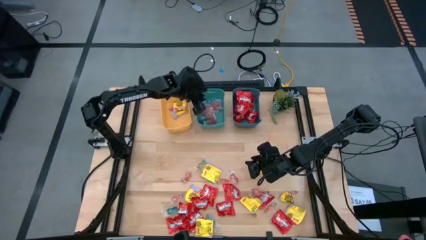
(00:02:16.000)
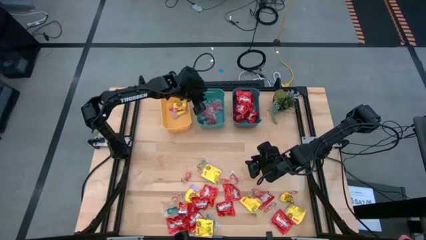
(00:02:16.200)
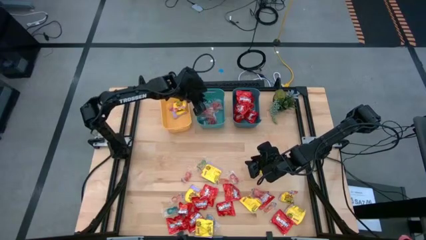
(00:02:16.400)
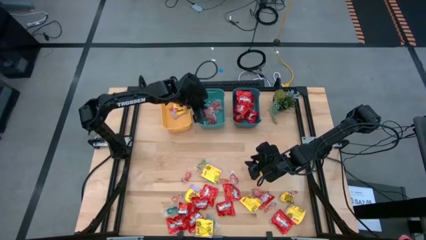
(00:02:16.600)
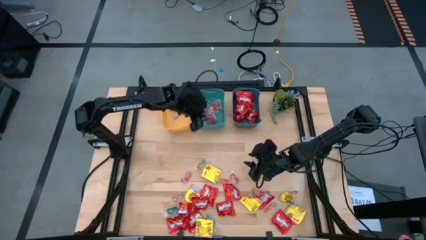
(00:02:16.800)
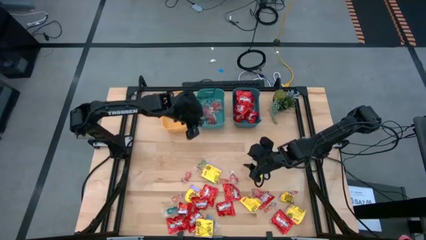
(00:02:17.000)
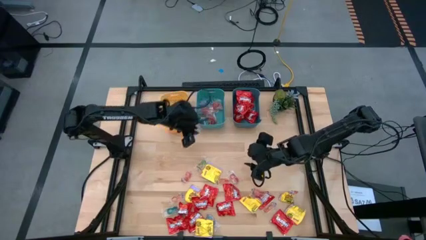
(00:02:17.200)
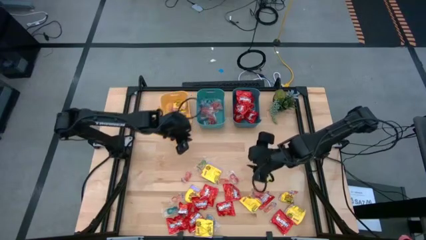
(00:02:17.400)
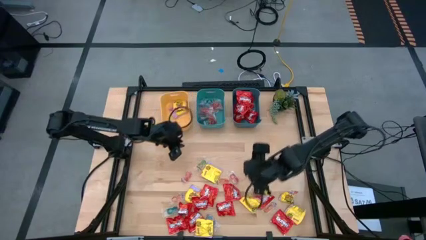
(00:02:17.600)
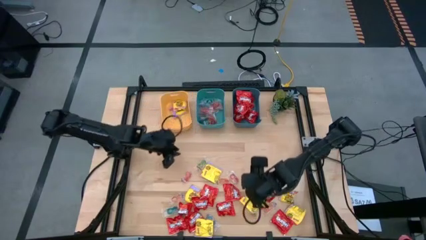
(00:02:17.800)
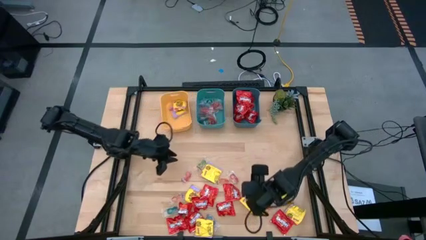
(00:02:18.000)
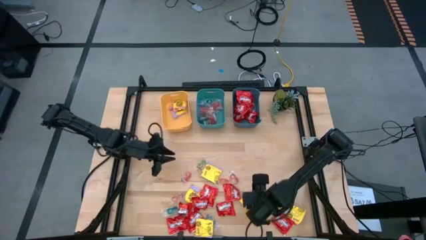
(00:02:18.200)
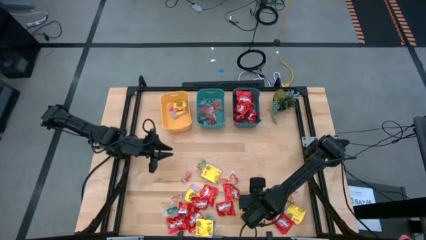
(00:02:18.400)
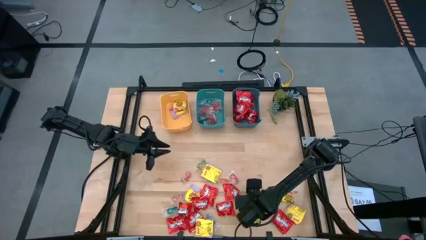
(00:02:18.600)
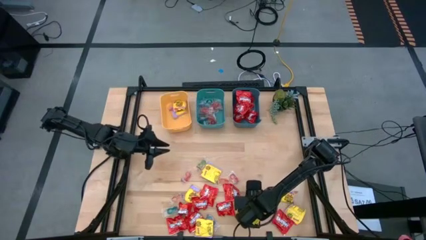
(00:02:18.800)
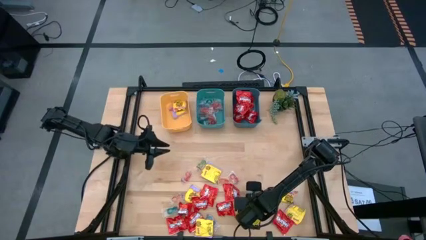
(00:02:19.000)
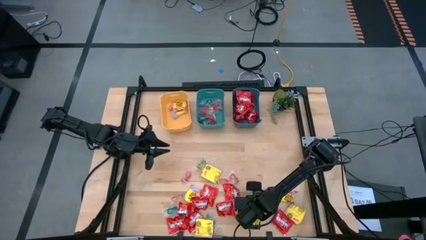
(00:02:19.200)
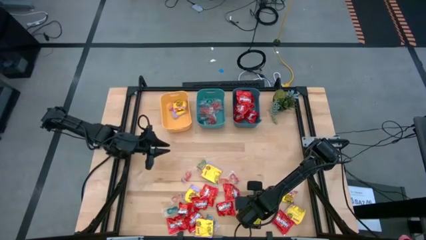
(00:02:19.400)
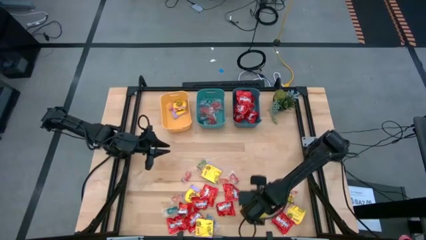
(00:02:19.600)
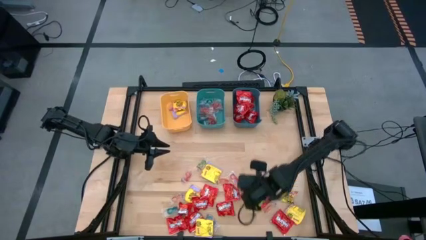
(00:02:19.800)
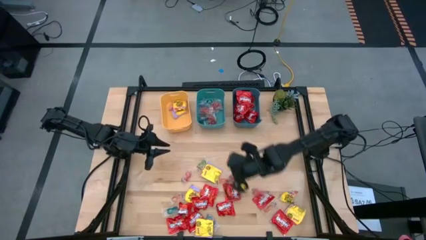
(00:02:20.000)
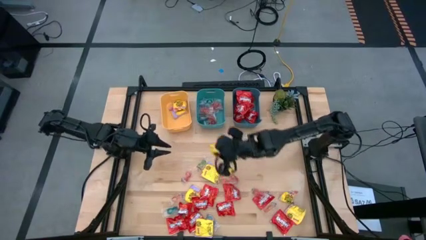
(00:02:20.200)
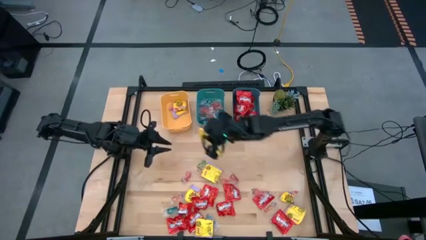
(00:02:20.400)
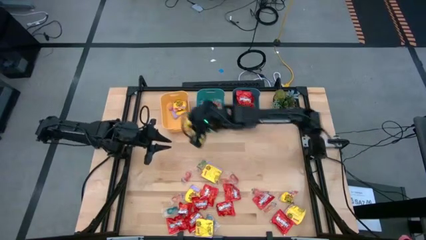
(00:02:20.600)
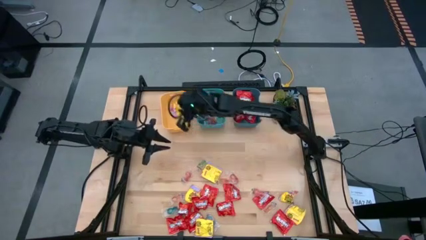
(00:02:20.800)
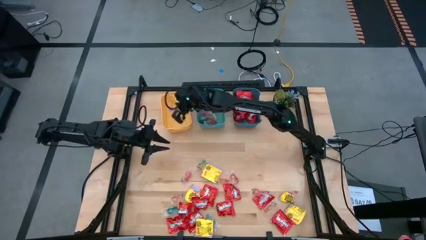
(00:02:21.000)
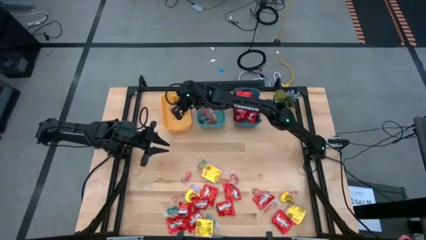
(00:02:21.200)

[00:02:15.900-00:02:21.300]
Task: Sort candy
Put the yellow candy into the yellow bin

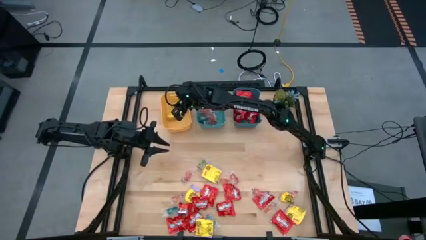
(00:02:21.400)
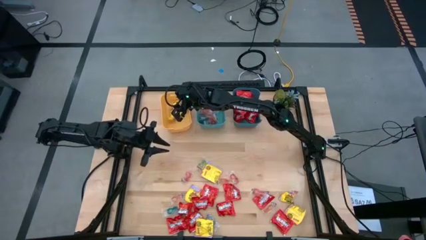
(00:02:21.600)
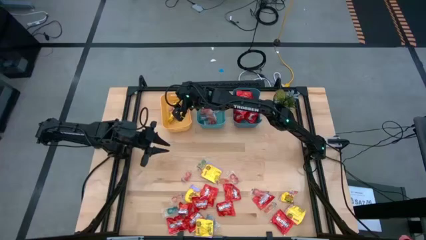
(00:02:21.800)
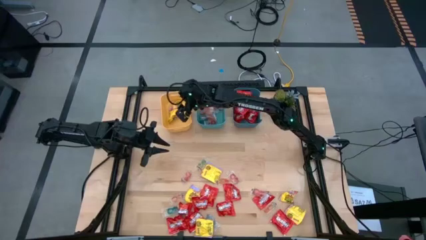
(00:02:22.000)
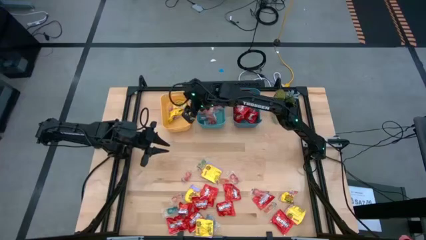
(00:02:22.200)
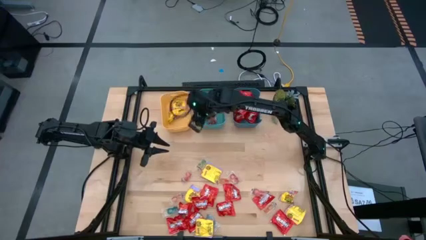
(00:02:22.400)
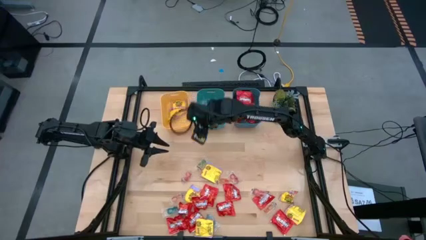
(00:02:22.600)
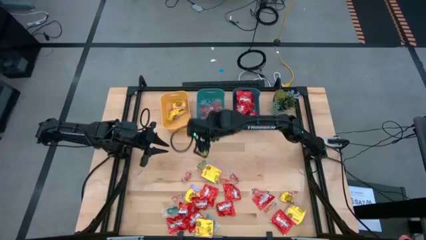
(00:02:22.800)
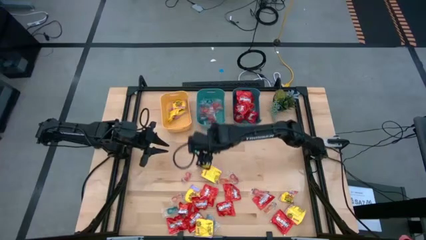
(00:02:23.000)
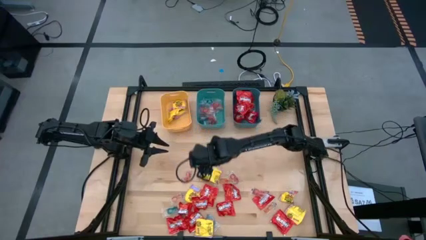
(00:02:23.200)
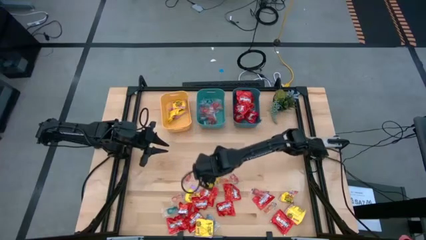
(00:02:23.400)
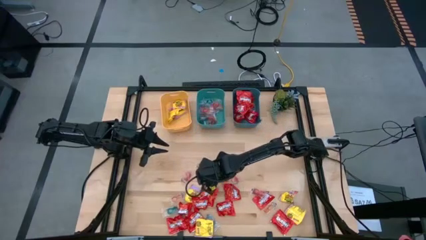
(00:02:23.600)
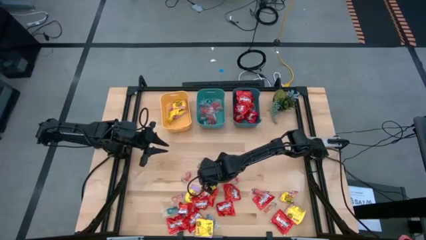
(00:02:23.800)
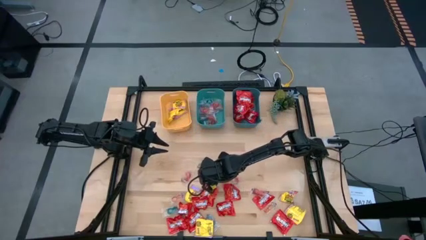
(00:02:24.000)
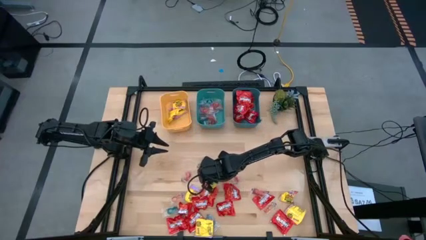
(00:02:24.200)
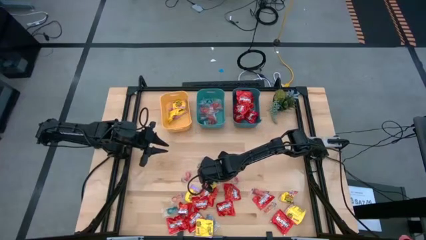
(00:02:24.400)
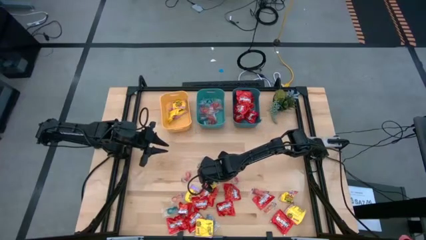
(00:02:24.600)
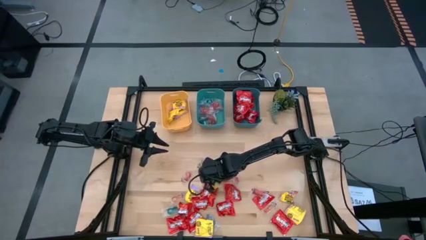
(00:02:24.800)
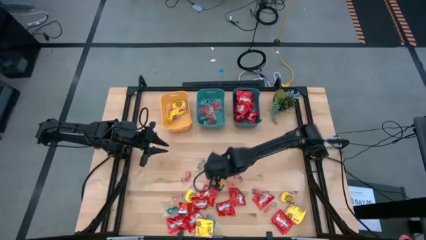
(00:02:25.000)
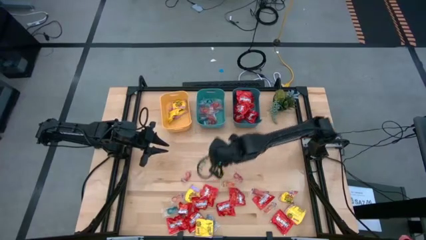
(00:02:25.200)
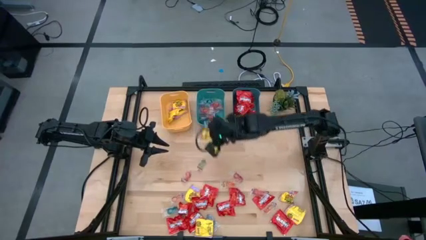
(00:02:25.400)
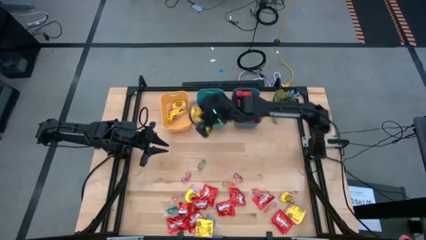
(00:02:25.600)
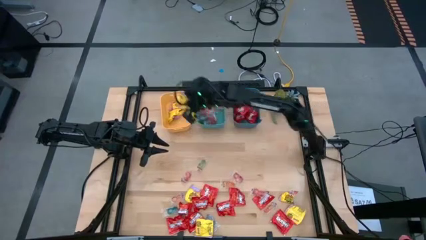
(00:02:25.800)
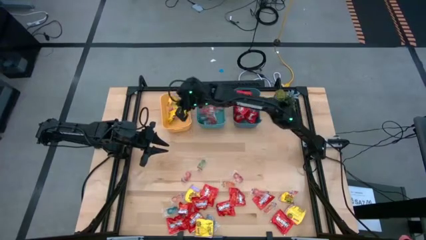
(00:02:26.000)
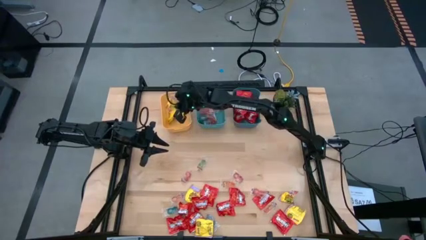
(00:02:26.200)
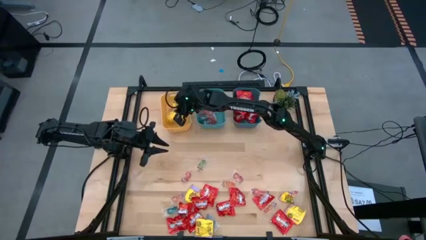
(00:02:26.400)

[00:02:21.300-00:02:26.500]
Put the yellow candy into the yellow bin

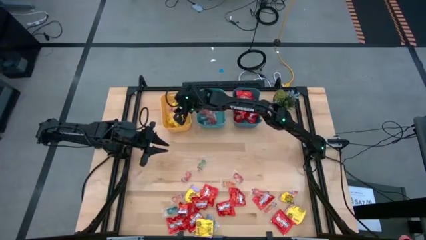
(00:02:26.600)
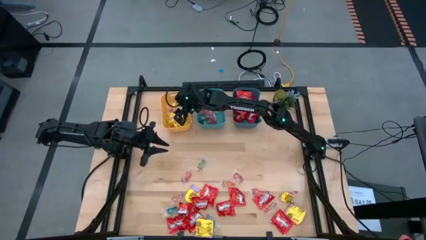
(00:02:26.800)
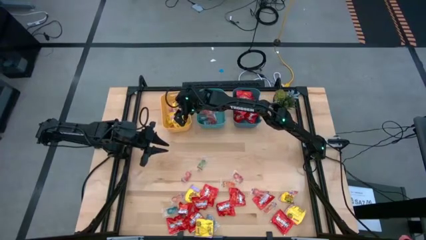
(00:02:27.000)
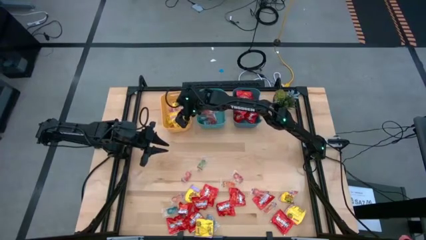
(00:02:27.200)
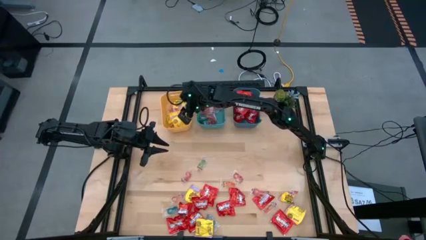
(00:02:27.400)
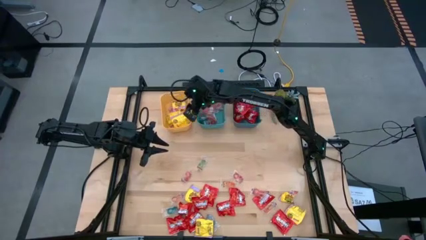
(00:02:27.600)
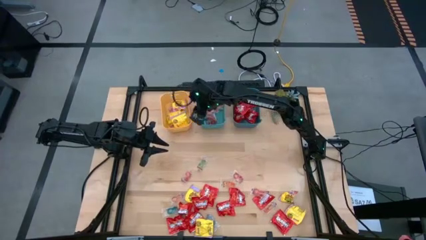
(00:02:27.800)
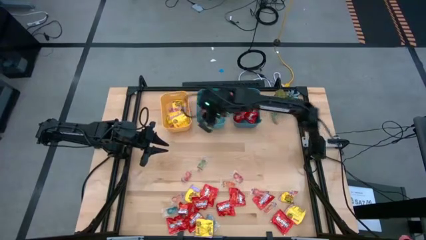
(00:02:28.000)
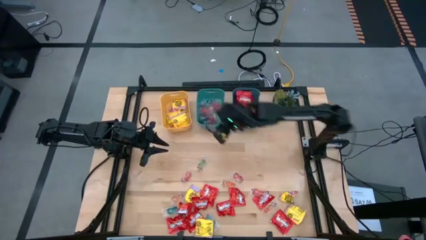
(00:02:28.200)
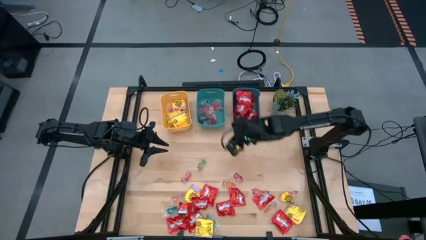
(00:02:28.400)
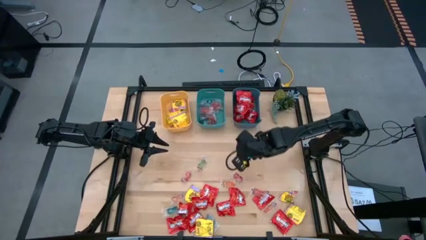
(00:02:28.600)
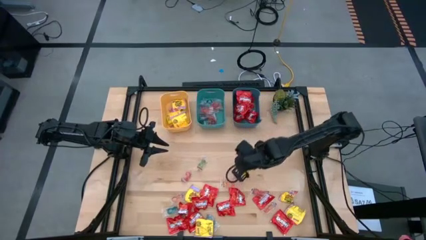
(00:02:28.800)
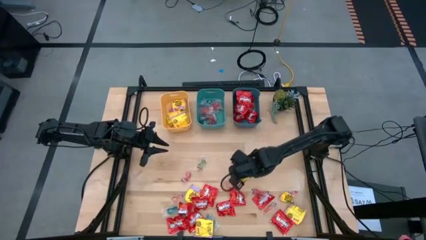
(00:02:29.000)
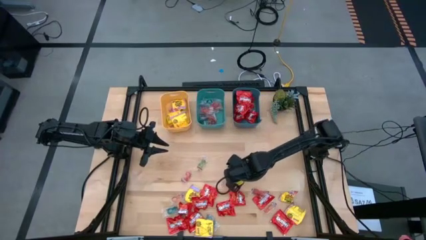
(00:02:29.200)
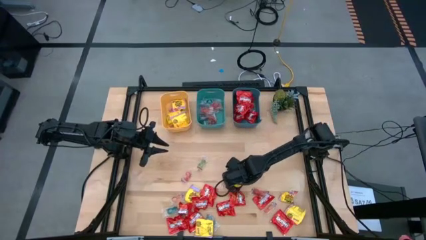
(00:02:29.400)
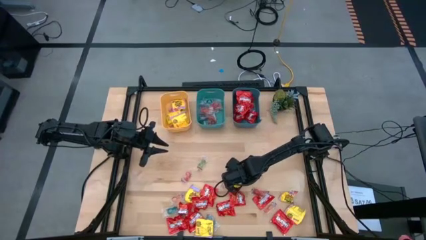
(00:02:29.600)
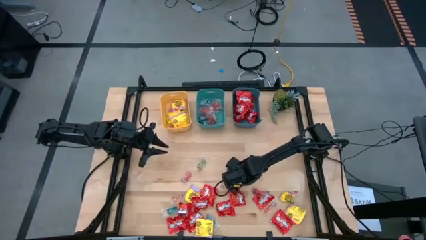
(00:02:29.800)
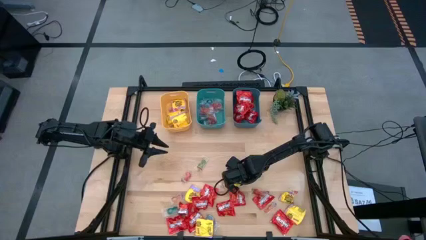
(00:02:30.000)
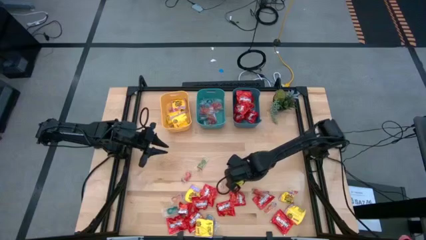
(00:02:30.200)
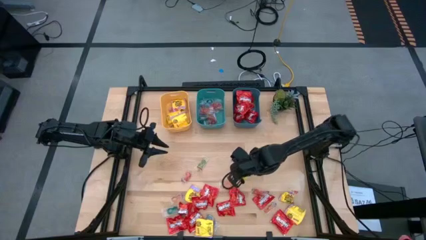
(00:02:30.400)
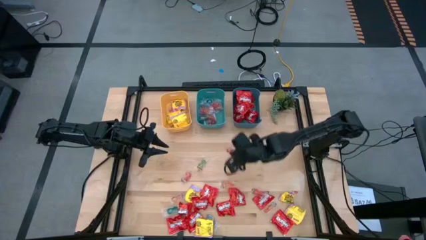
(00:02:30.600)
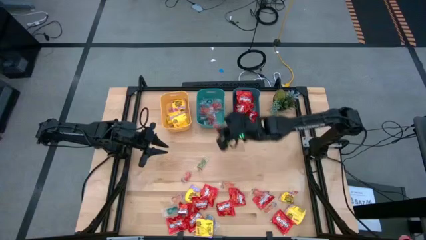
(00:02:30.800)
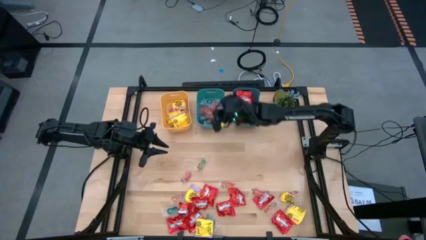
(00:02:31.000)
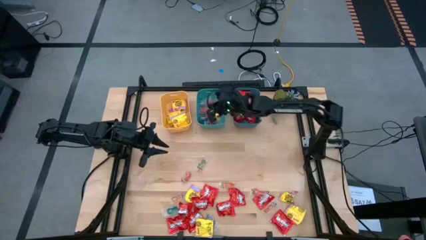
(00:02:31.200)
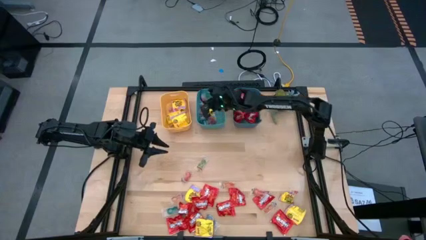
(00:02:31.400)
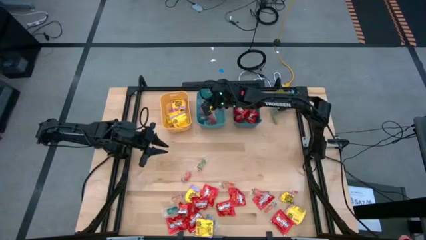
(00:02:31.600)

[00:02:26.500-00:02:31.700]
Put the orange gummy candy into the green bin
